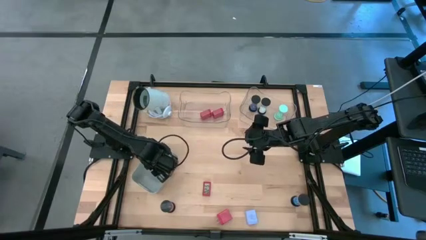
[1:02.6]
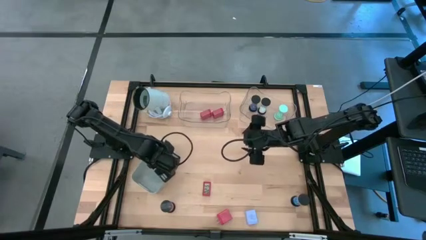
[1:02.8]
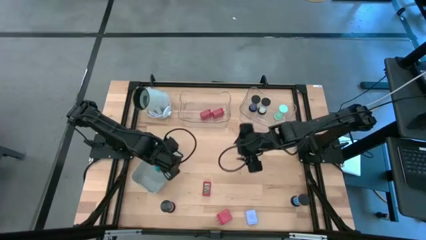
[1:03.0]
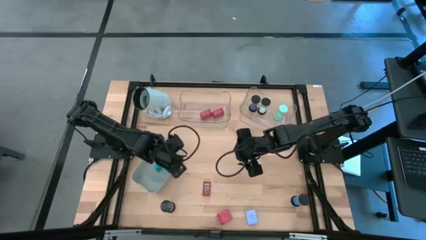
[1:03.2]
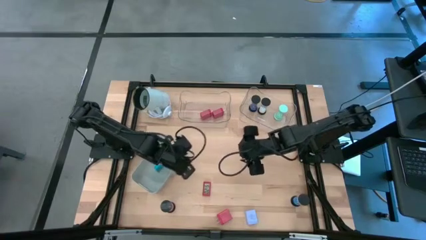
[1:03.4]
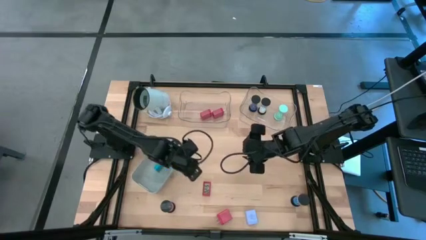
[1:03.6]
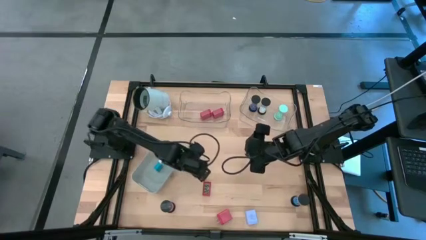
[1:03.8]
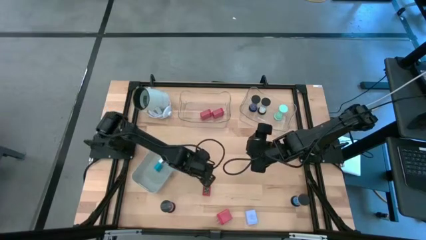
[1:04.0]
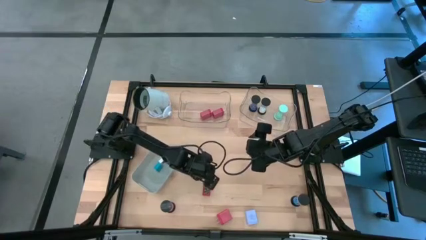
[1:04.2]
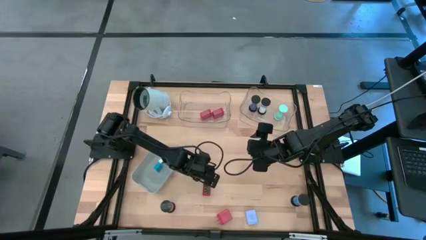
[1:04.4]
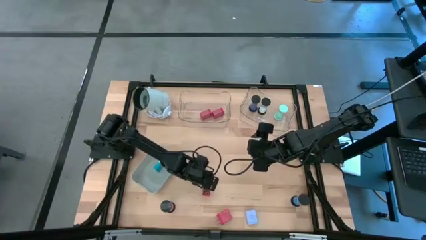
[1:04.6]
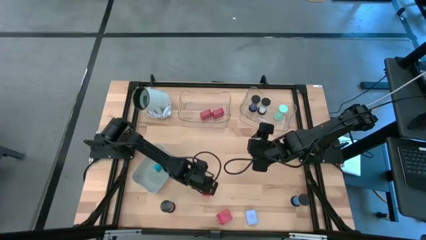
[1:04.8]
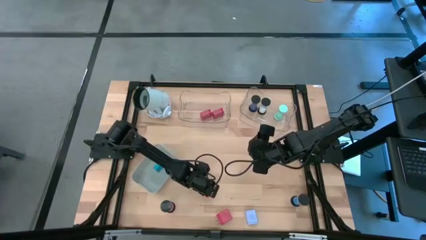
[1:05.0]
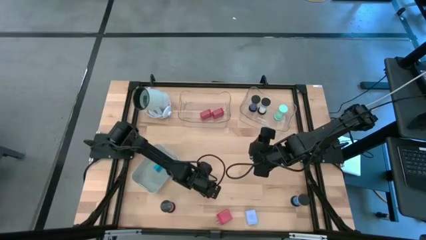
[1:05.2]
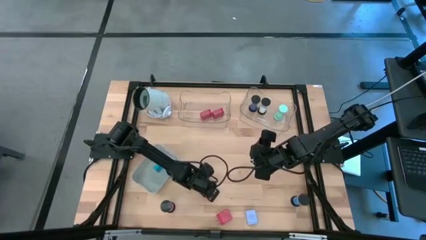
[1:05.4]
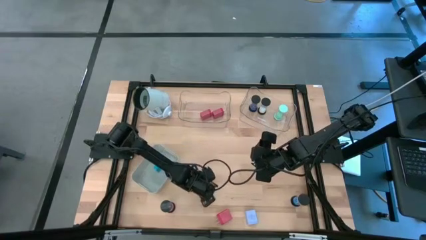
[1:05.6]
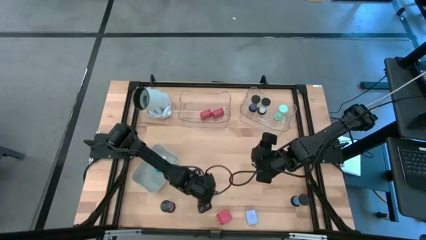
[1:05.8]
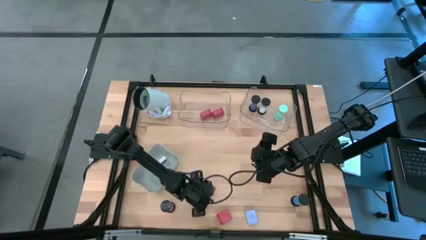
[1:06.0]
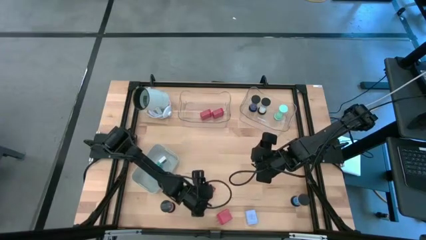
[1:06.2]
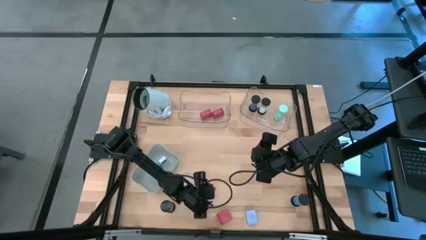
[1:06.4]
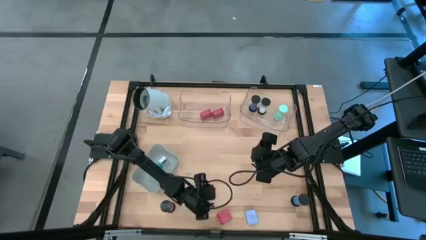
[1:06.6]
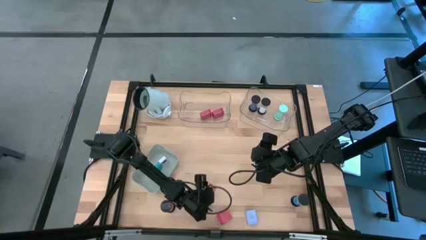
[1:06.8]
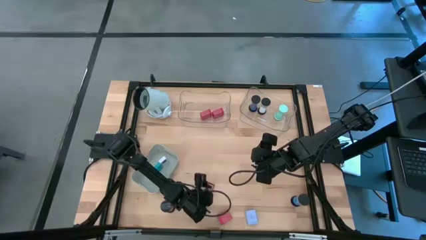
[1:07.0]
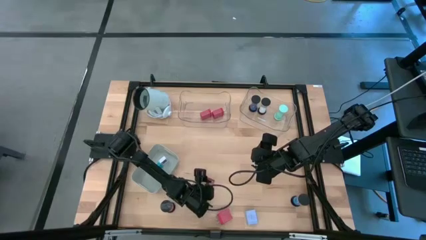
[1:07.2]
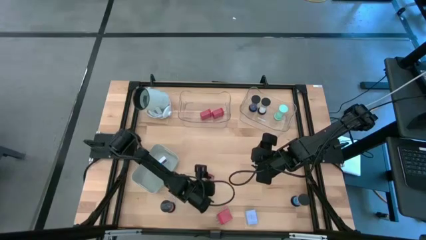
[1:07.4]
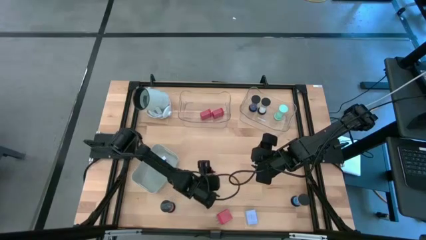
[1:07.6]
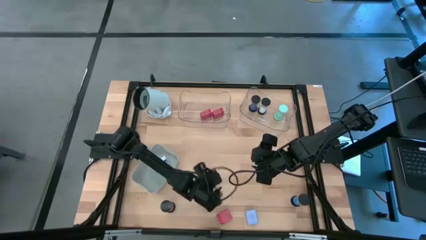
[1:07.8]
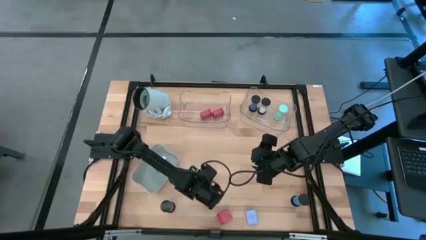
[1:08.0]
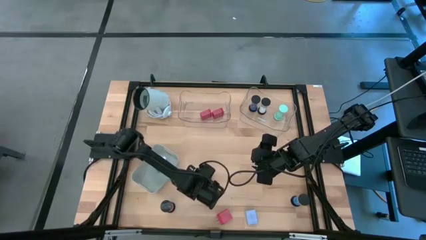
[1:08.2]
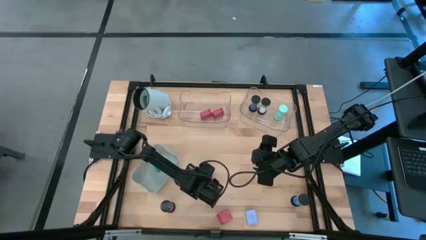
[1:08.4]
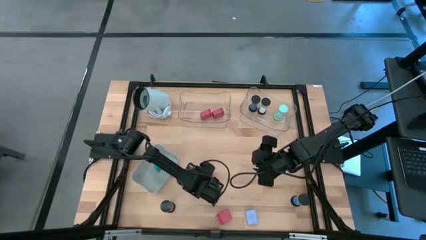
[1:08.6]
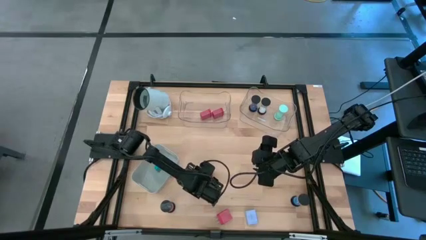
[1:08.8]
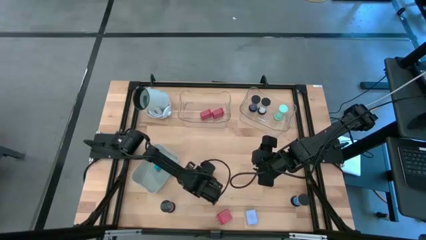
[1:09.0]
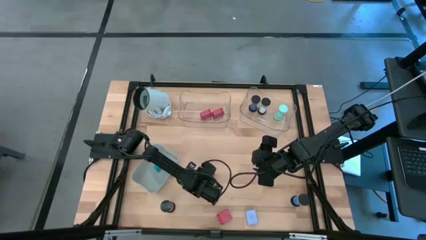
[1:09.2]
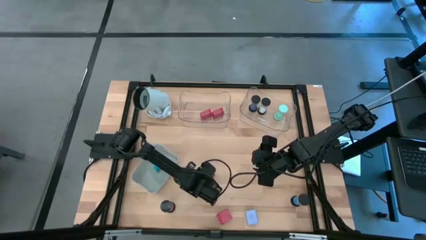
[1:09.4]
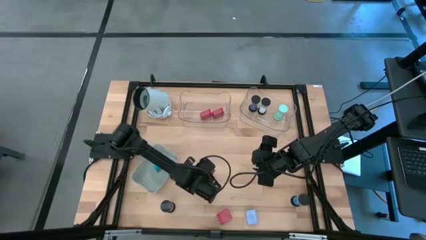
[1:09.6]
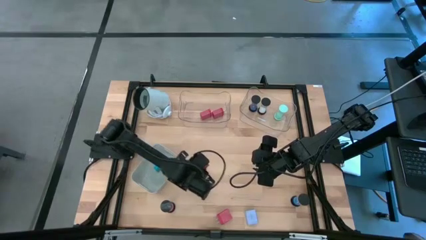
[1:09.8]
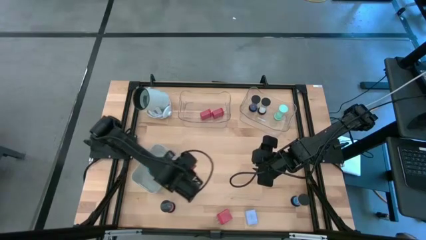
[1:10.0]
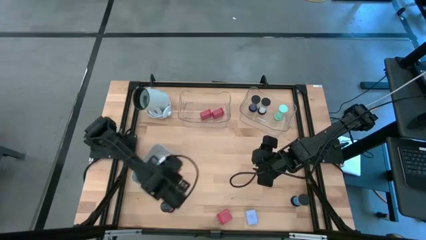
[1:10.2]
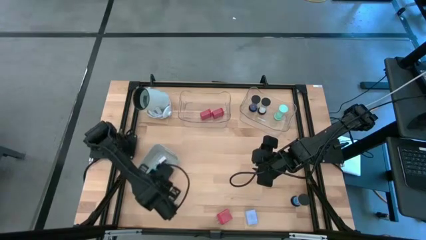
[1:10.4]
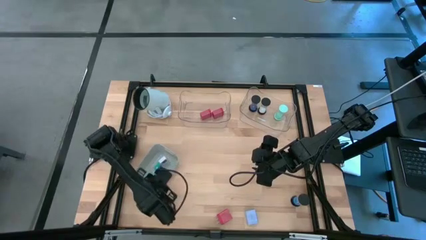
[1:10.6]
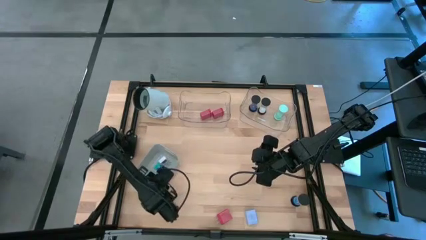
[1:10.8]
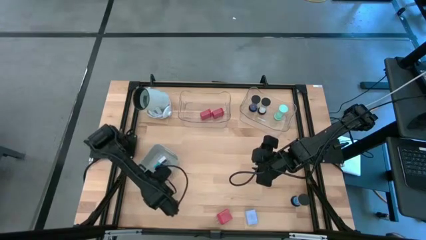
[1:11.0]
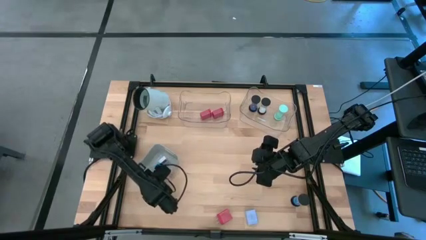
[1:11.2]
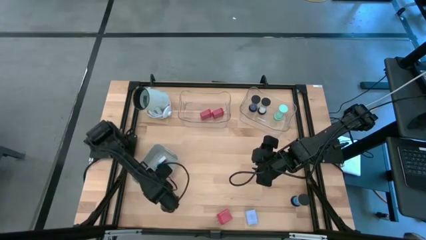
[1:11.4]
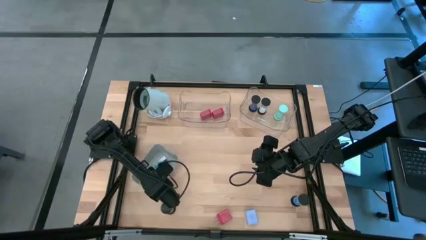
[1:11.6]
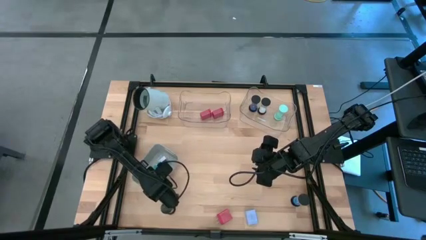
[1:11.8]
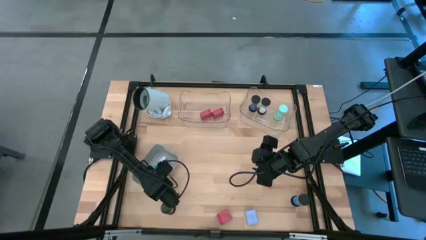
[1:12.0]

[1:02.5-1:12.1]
Task: Pick & Place Office items
Put the red digital clock into the gray bin

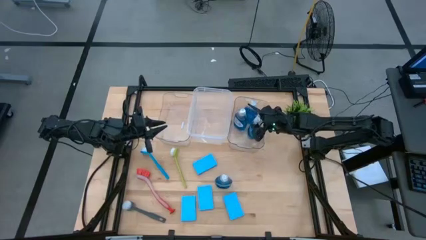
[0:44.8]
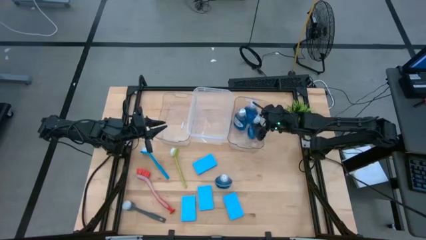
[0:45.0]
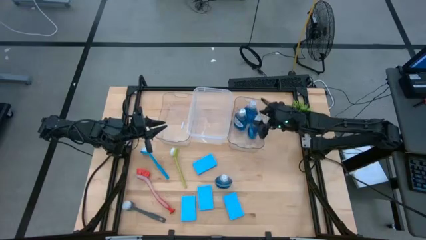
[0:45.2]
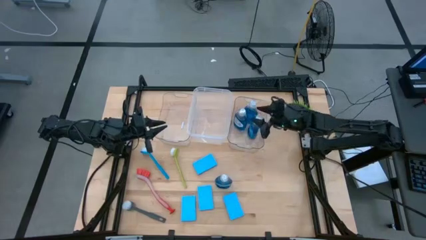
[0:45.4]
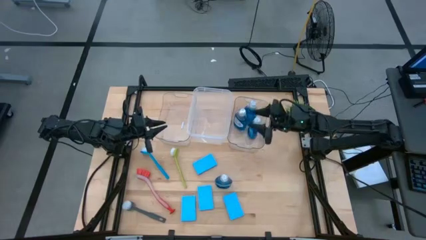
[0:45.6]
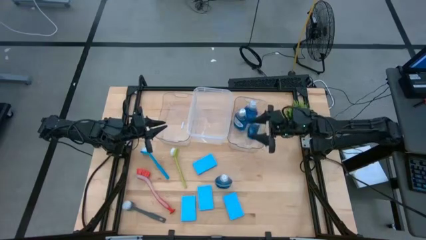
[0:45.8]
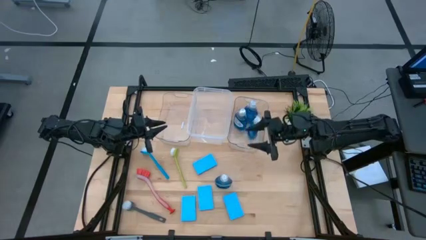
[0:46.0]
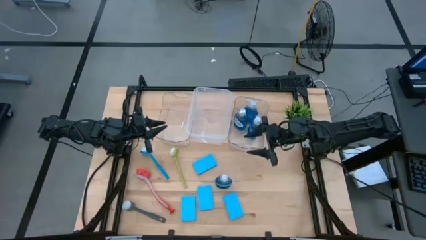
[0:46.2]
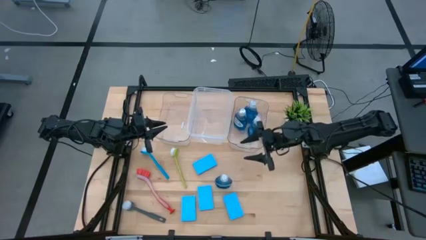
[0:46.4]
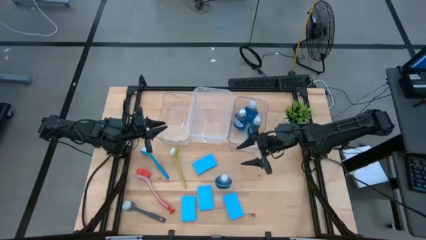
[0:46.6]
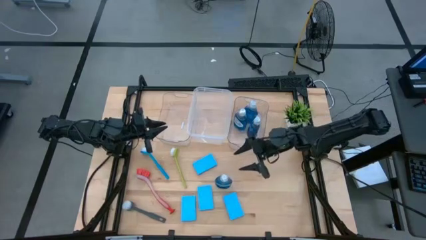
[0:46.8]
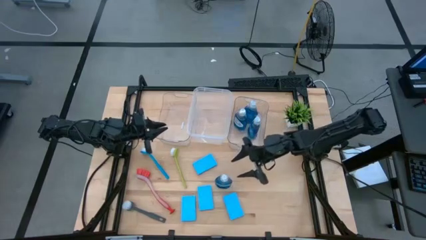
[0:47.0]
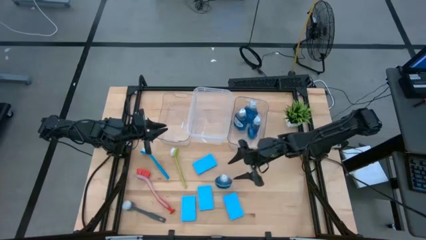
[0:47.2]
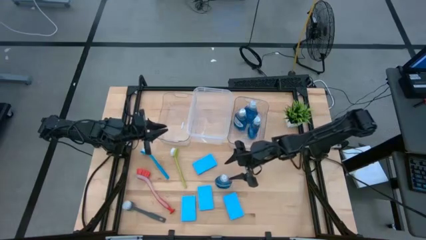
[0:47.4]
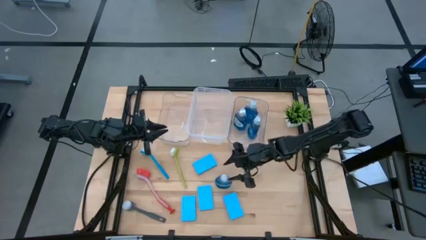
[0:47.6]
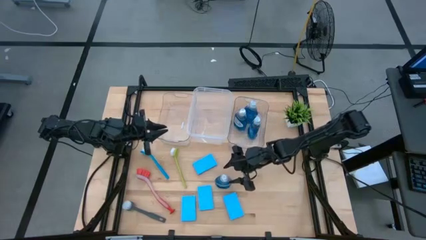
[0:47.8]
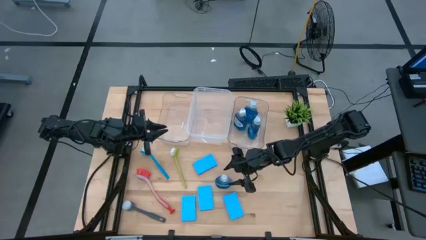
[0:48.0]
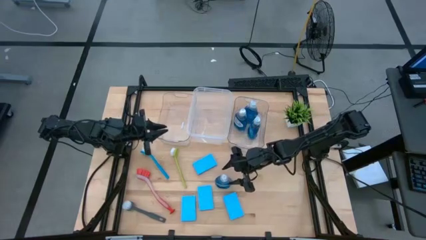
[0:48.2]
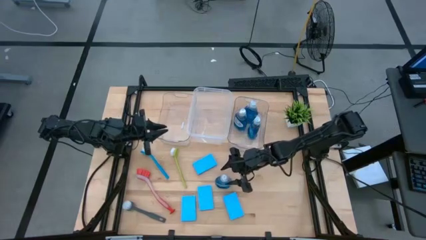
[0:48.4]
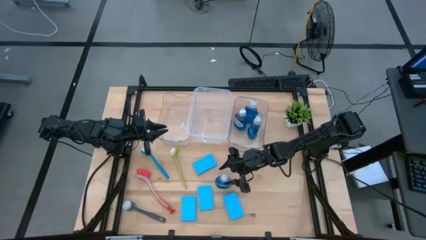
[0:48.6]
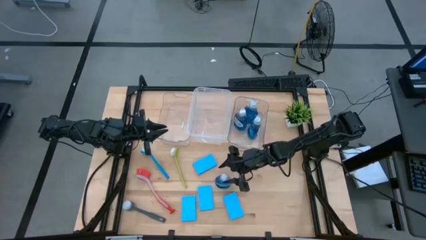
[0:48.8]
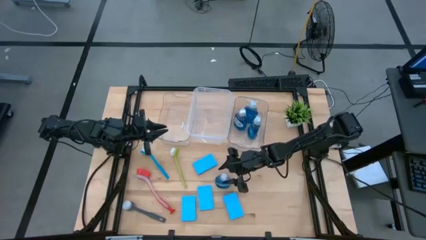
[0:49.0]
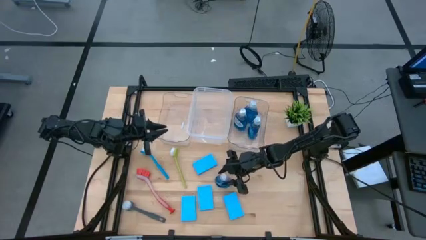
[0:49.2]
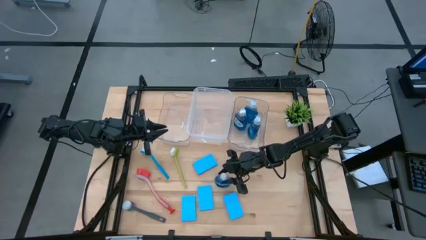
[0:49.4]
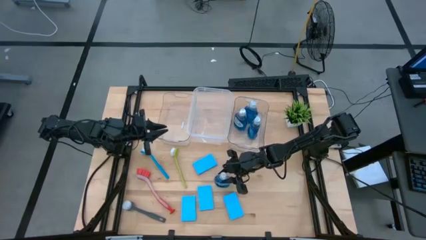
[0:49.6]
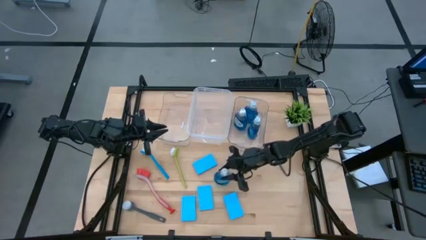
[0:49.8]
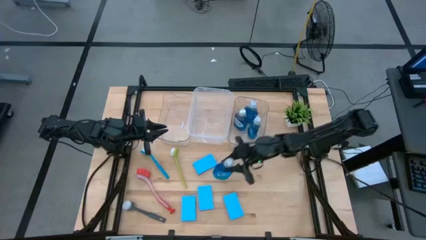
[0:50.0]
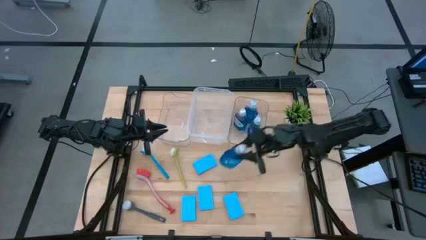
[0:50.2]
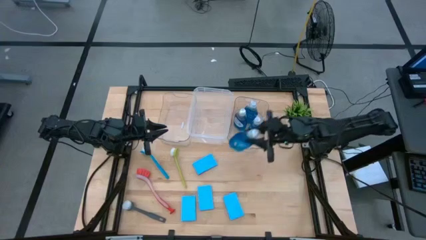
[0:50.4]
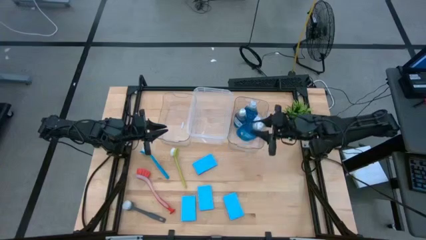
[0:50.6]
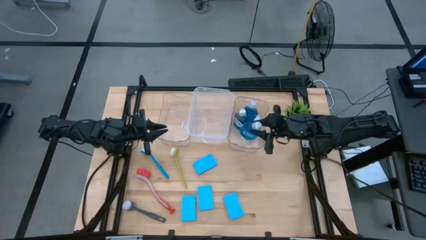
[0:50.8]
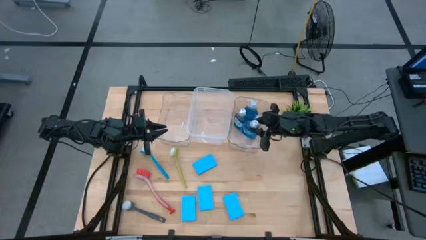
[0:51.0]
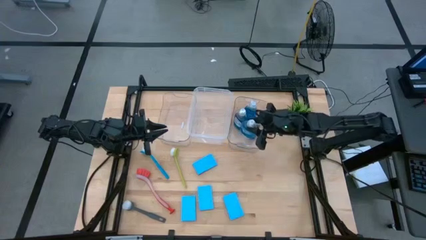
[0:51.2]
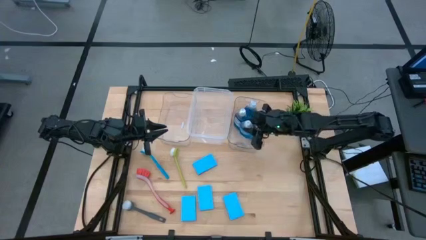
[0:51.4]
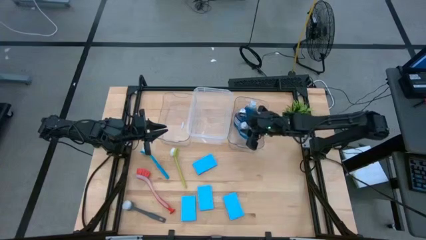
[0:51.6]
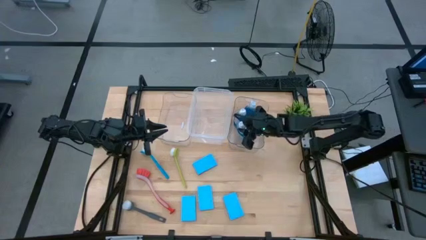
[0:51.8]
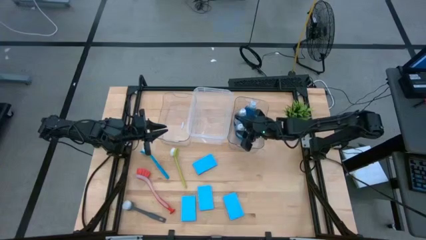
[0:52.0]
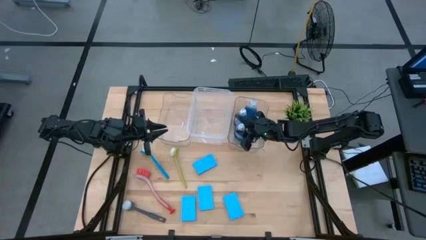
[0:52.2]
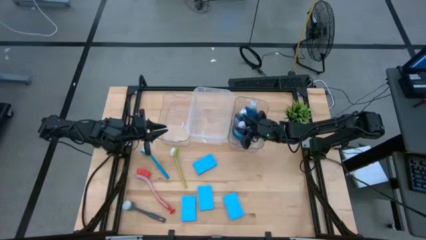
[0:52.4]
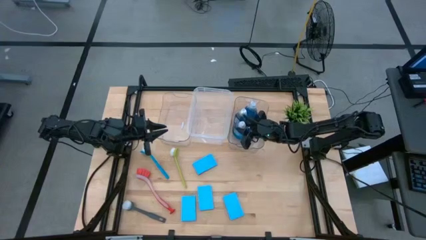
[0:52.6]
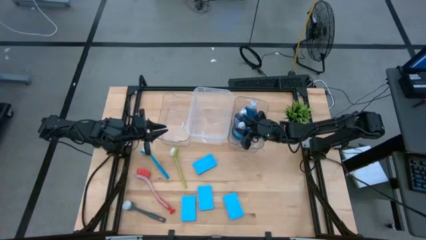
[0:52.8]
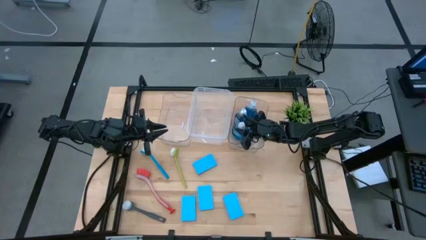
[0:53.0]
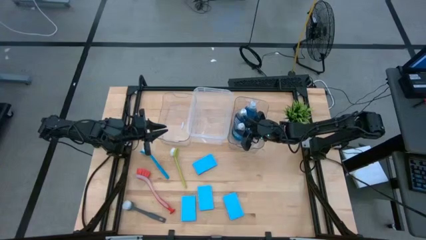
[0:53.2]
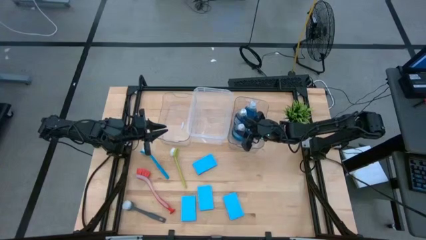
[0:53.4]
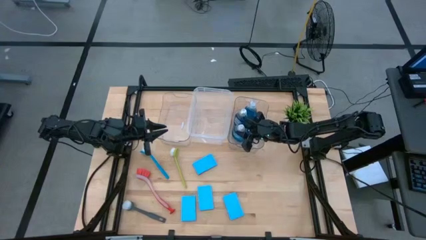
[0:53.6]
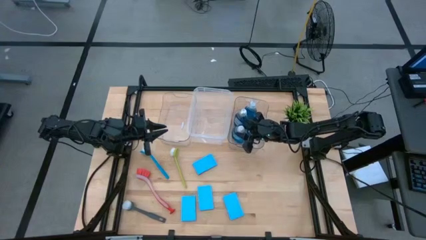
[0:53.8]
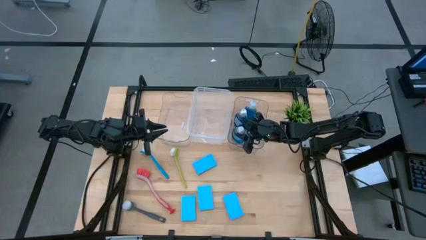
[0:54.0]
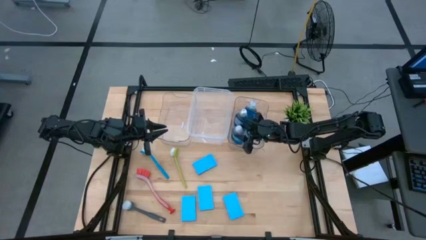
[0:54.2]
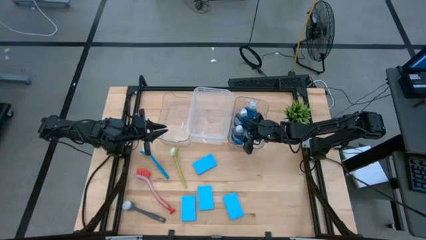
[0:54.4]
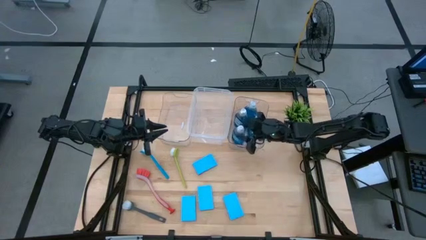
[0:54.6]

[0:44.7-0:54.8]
Task: Pick & Place Kitchen Sink Supplies
Put the blue dish soap into the right transparent bin
